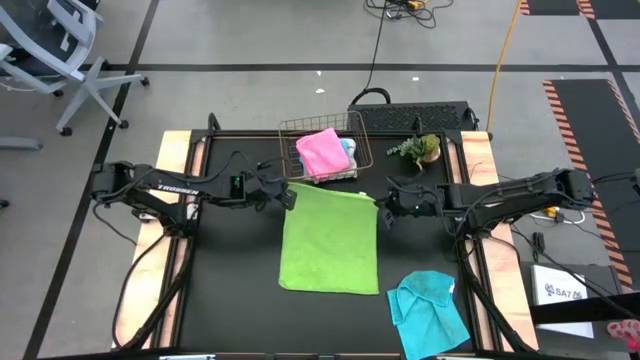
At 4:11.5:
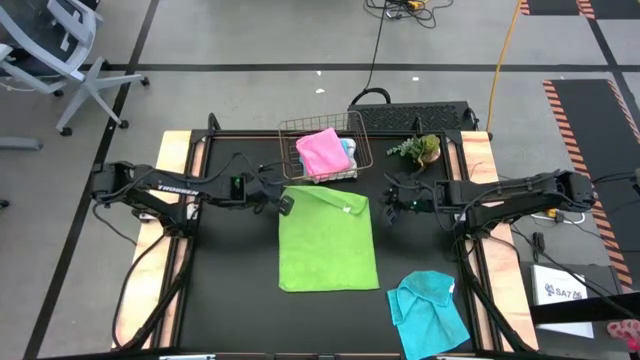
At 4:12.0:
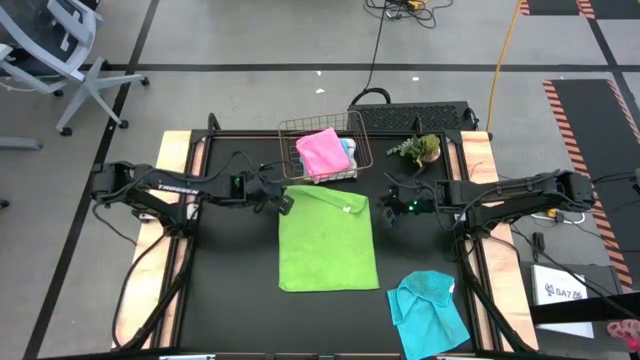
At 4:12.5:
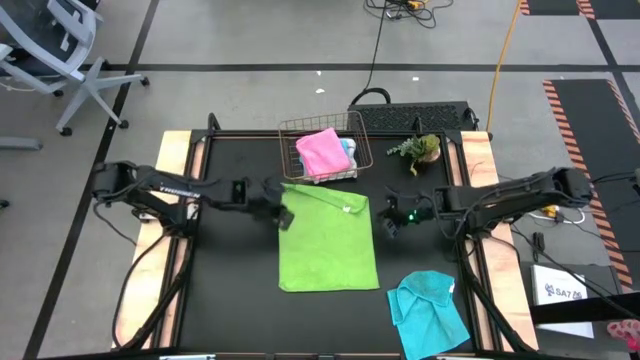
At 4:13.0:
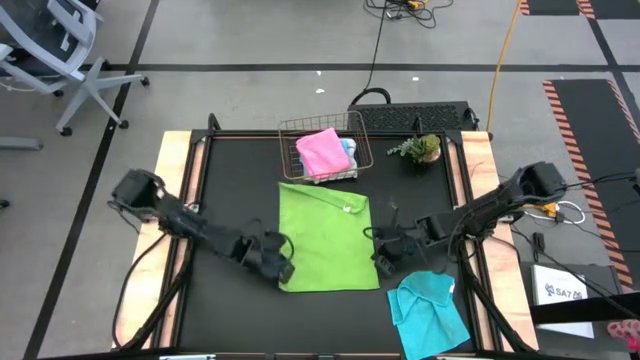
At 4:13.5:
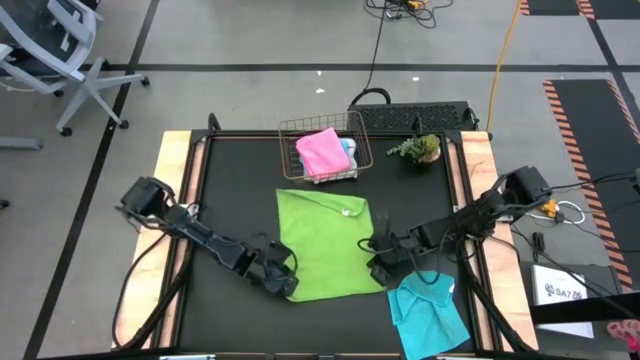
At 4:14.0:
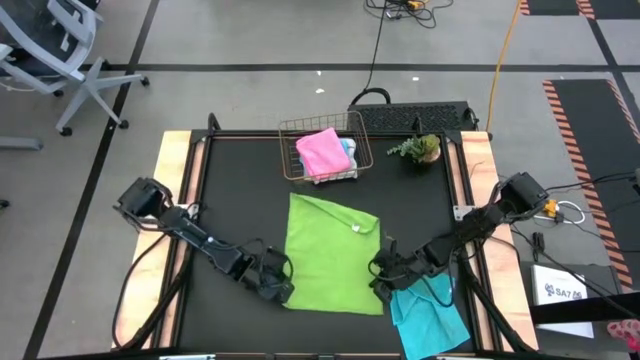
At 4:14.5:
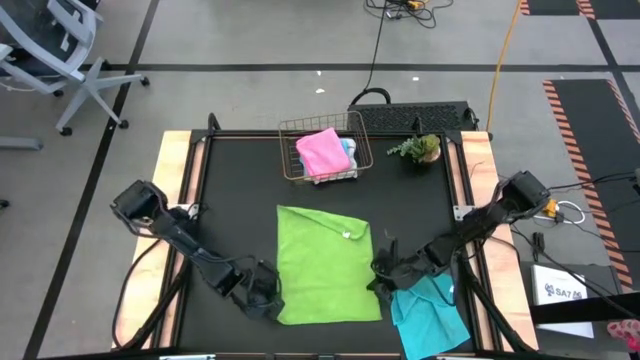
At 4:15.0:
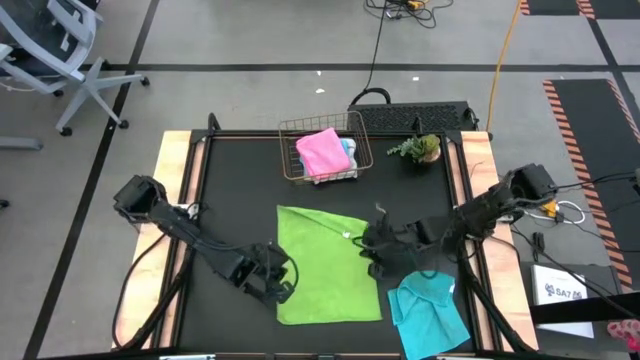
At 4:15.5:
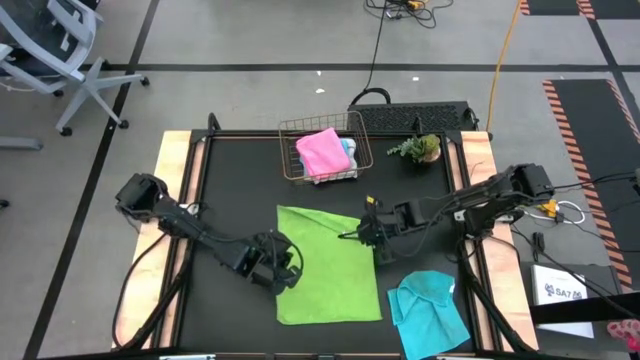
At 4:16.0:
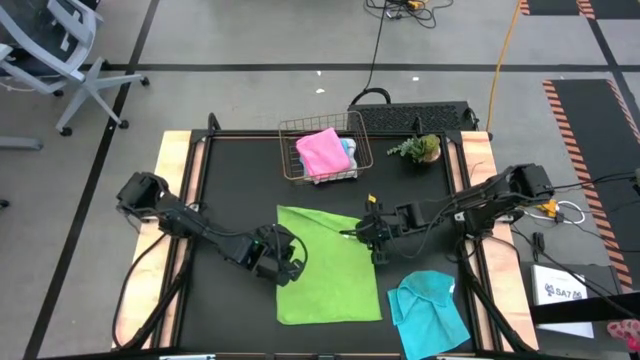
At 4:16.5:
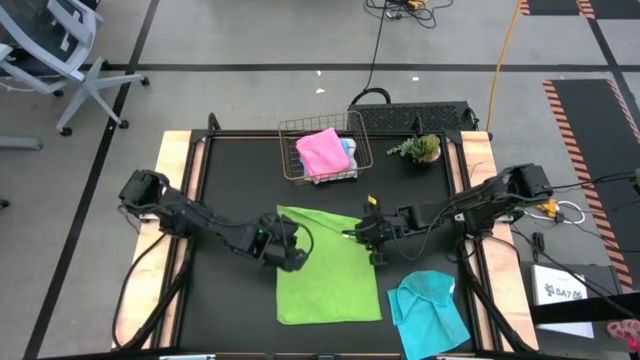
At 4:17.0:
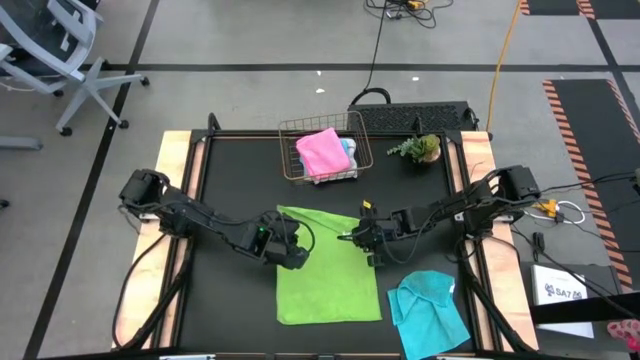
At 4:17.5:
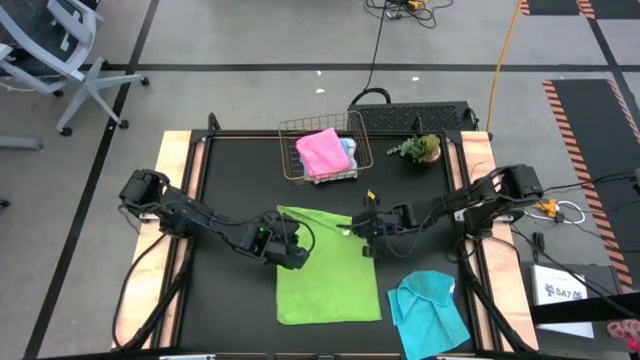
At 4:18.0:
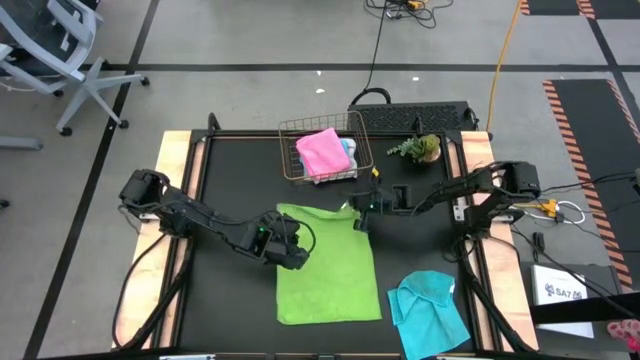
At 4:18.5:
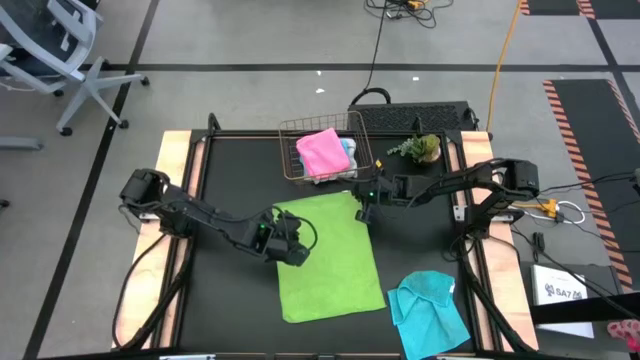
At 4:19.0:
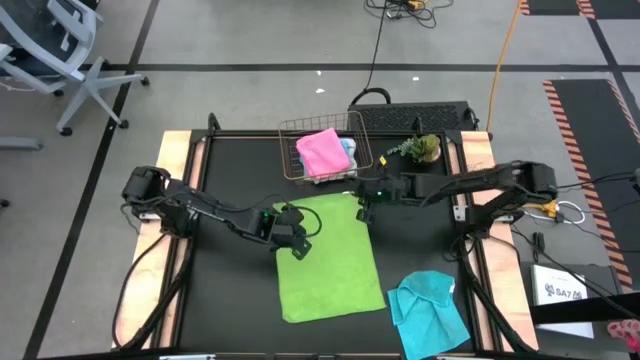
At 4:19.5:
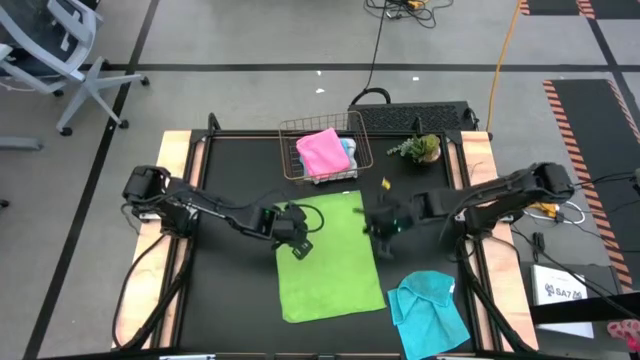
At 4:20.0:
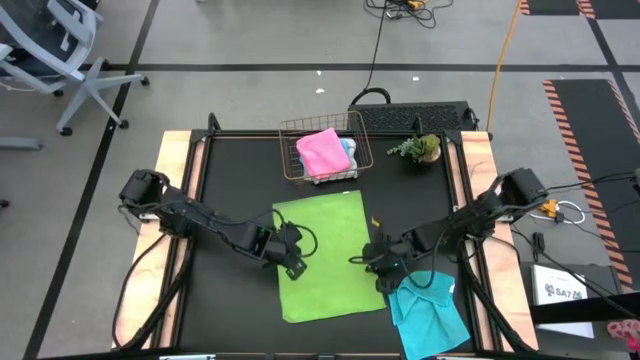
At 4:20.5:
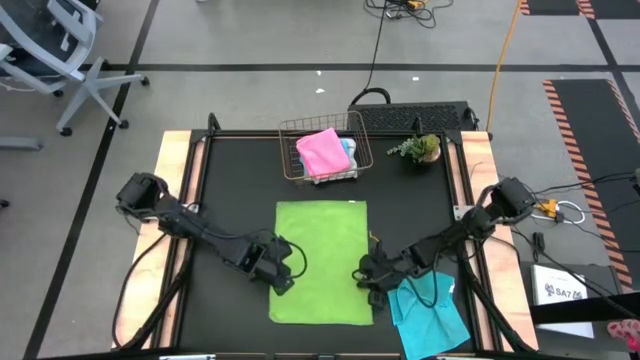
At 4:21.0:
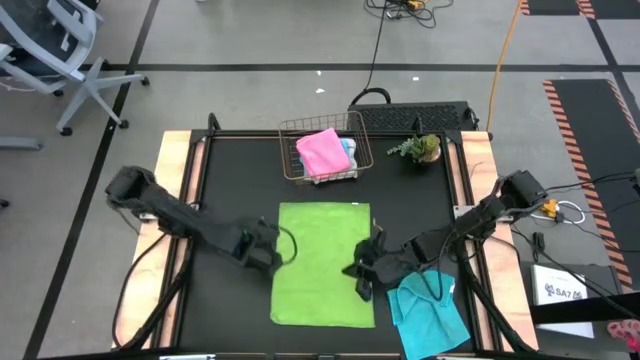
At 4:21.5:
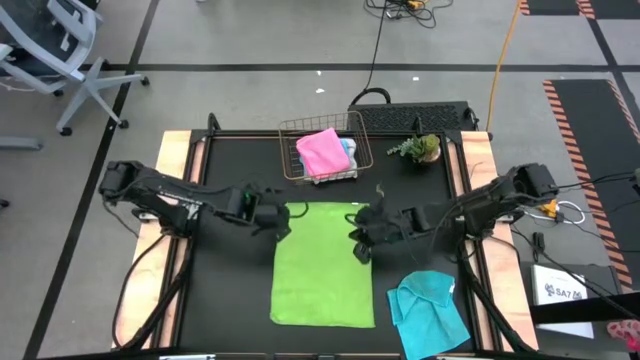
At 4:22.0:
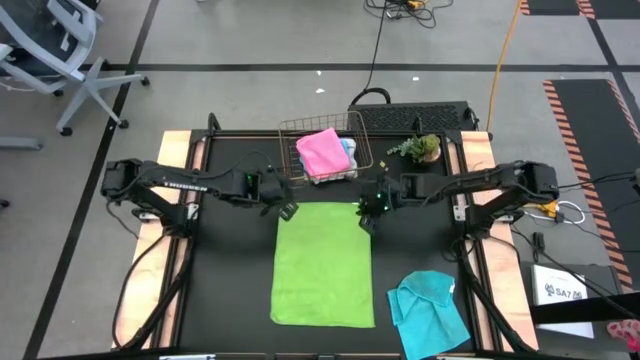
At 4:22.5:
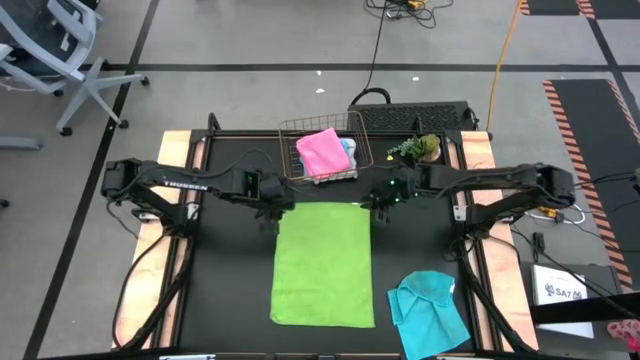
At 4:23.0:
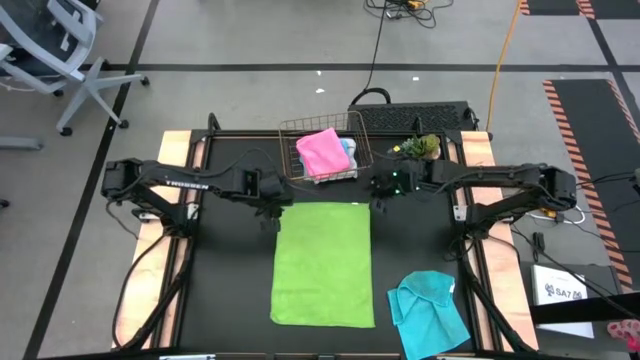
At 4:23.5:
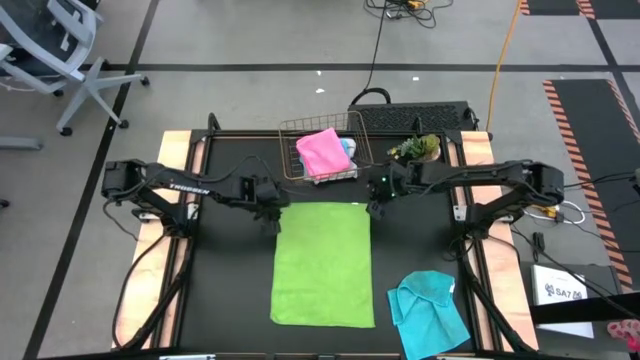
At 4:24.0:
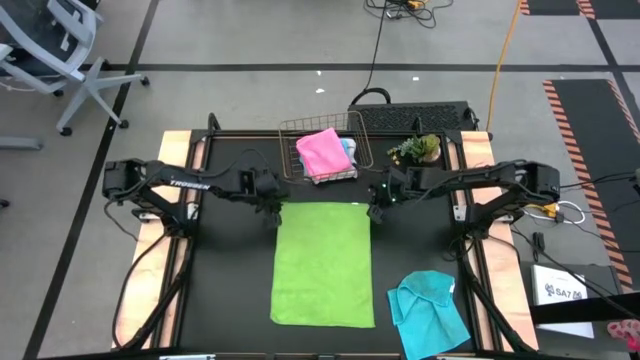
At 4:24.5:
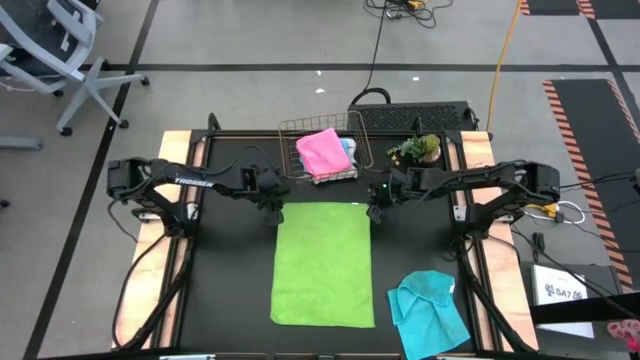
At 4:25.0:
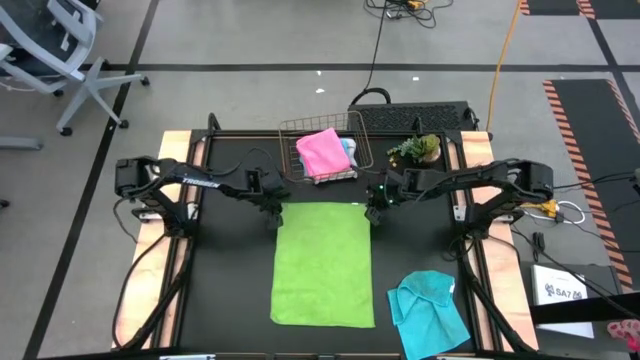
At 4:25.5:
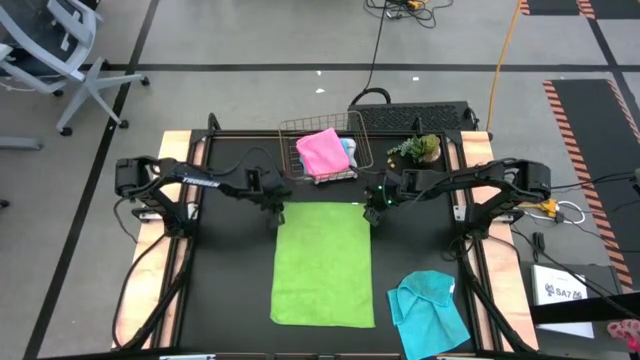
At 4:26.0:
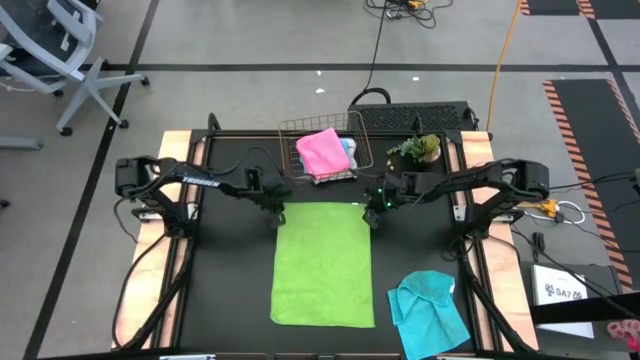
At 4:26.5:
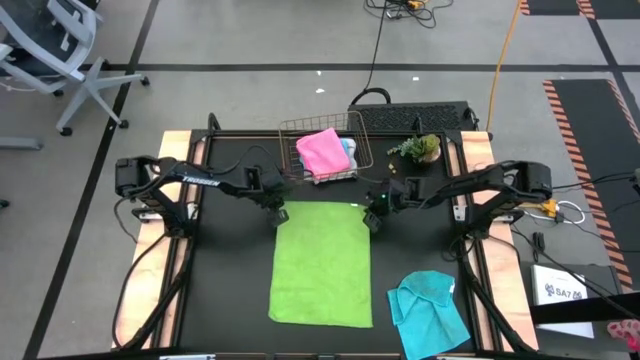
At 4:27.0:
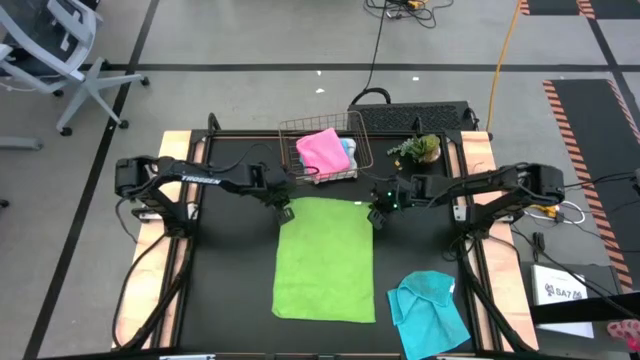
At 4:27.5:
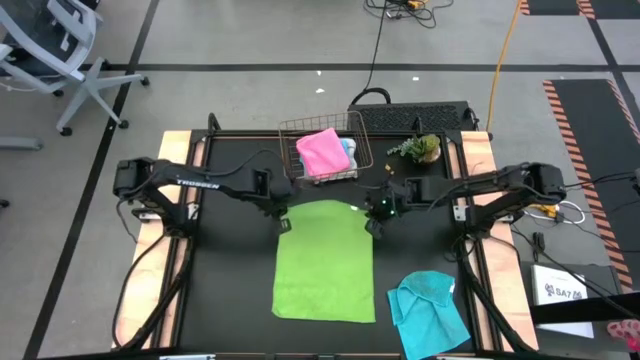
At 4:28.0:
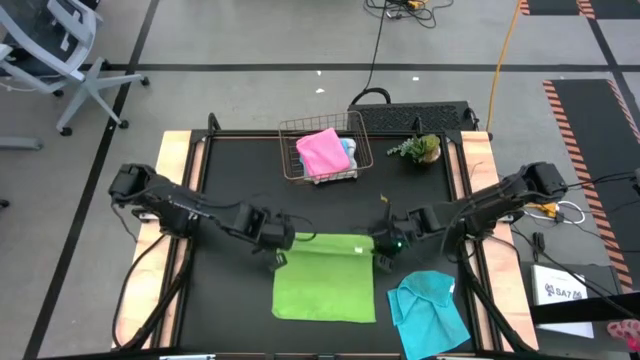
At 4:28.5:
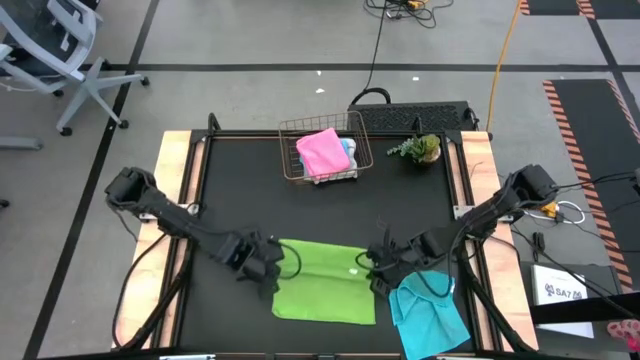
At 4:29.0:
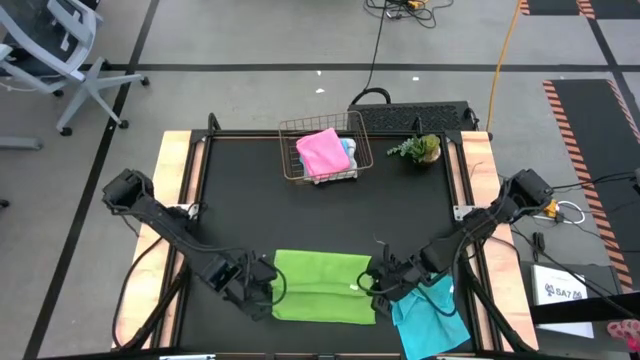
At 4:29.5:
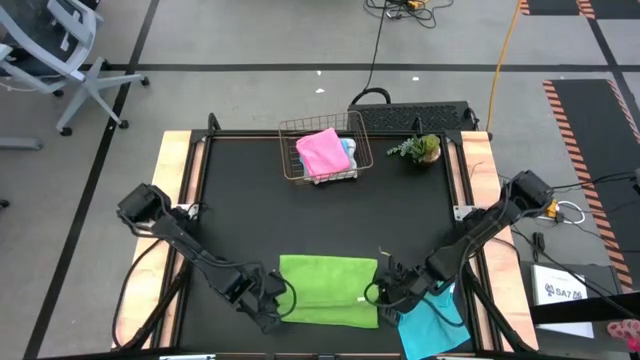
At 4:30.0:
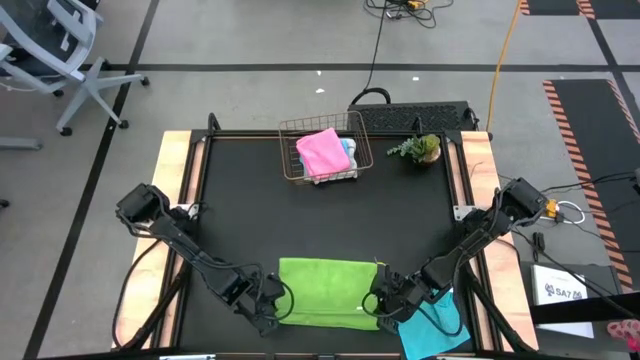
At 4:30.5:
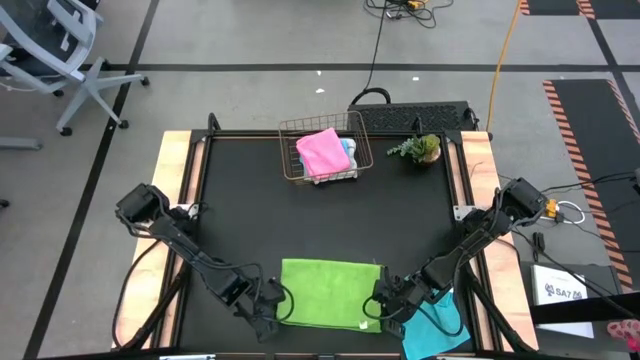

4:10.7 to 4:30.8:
Task: Fold microfiber towels
Fold the green microfiber cloth

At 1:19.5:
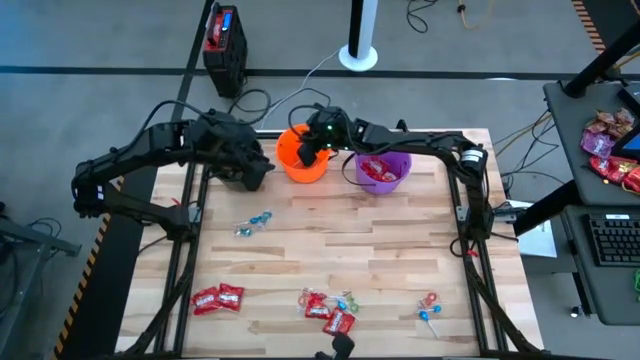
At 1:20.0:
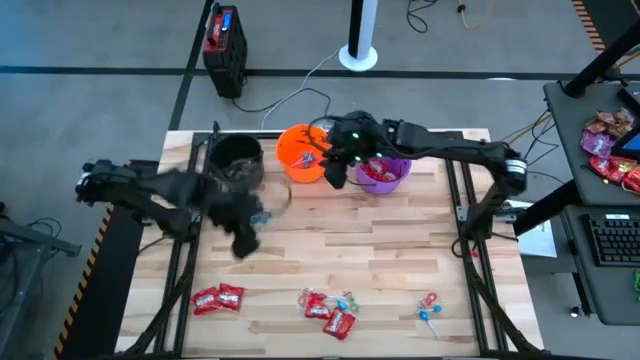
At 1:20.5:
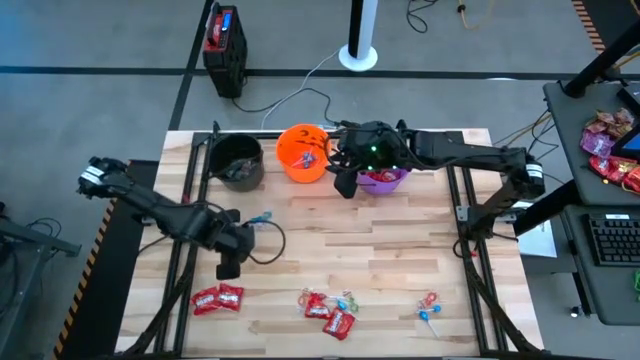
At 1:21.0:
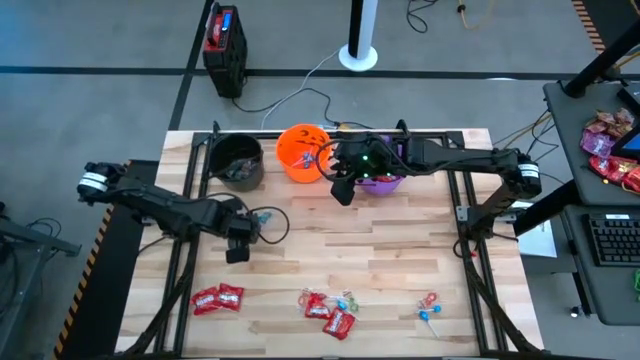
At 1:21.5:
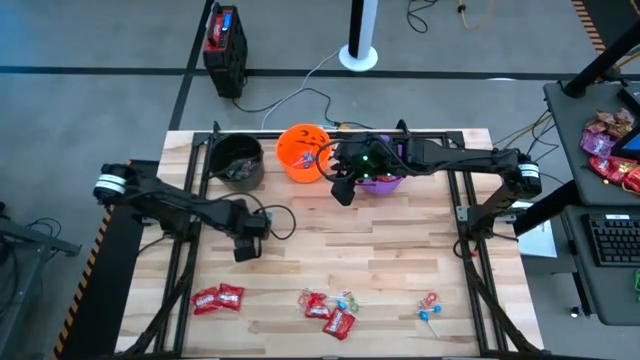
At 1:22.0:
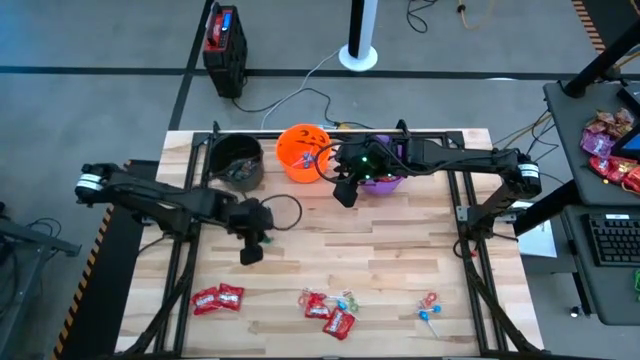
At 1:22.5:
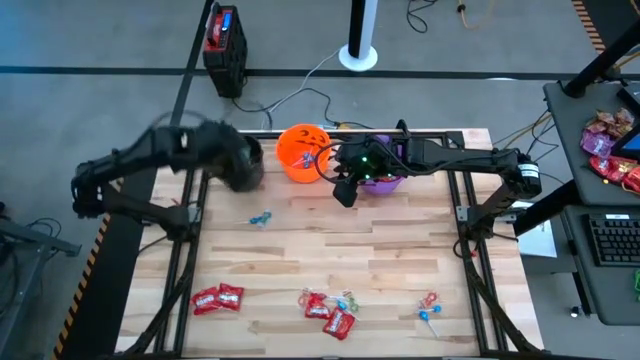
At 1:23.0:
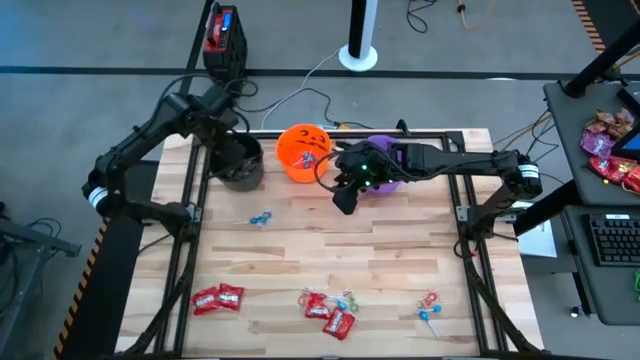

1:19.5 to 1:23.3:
Task: Sort candy by brand, put in halloween buckets
Put the blue gummy into the black bucket
